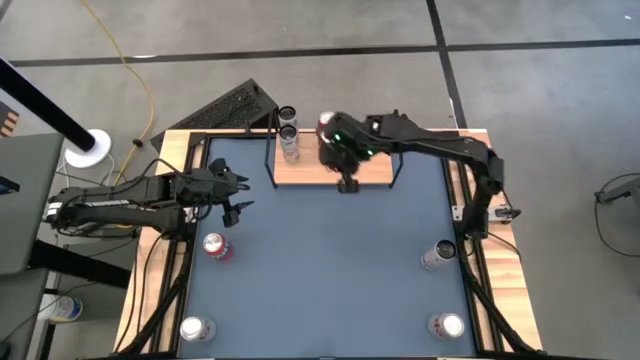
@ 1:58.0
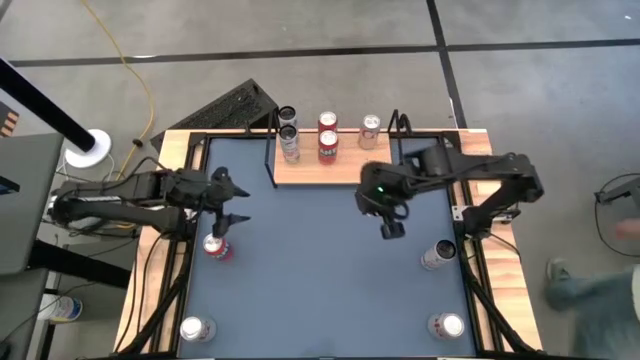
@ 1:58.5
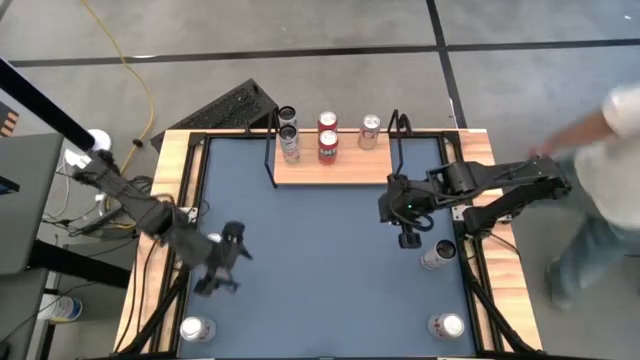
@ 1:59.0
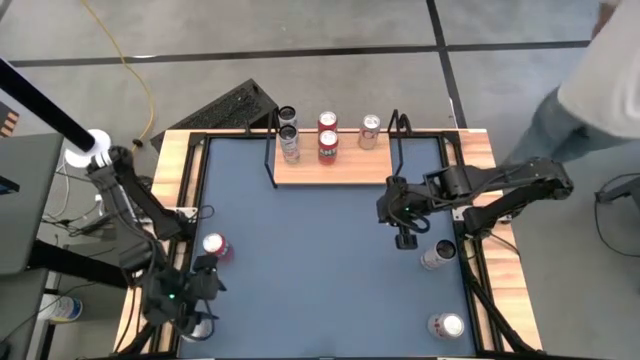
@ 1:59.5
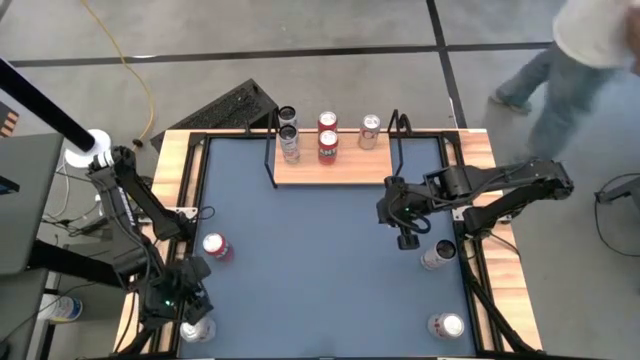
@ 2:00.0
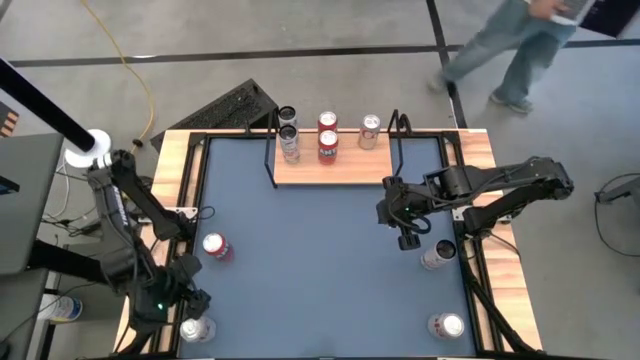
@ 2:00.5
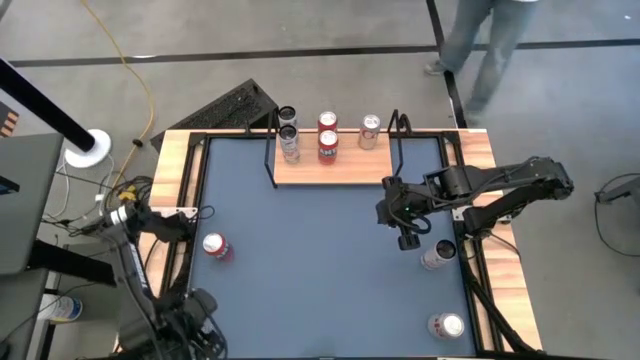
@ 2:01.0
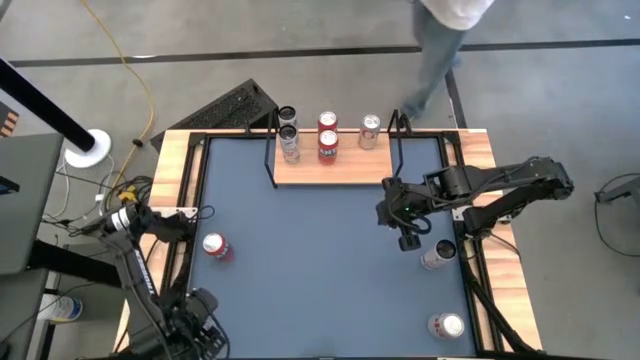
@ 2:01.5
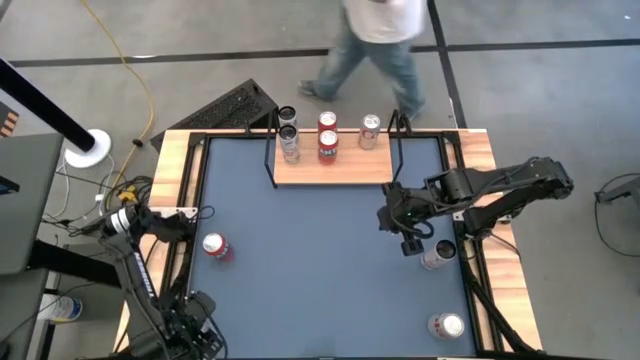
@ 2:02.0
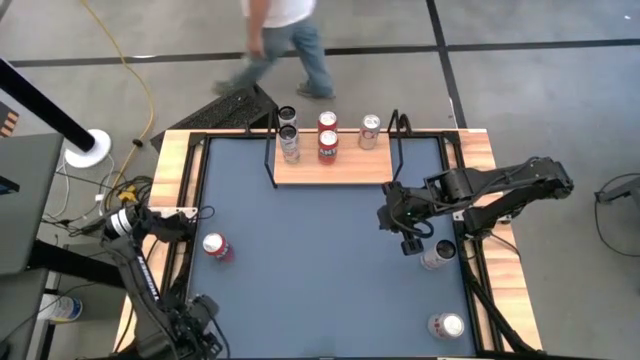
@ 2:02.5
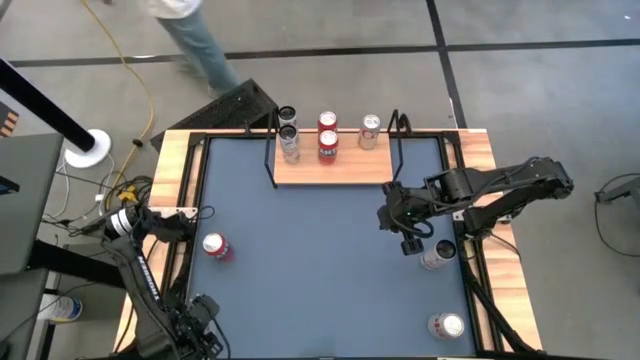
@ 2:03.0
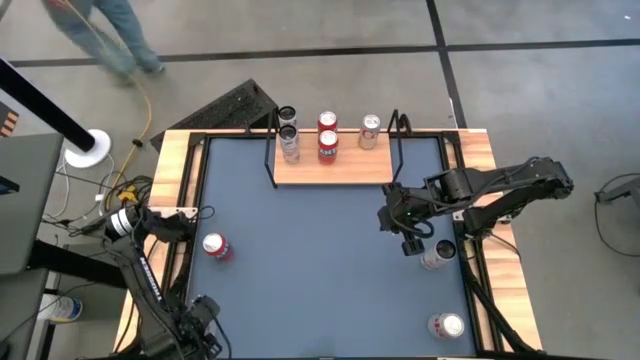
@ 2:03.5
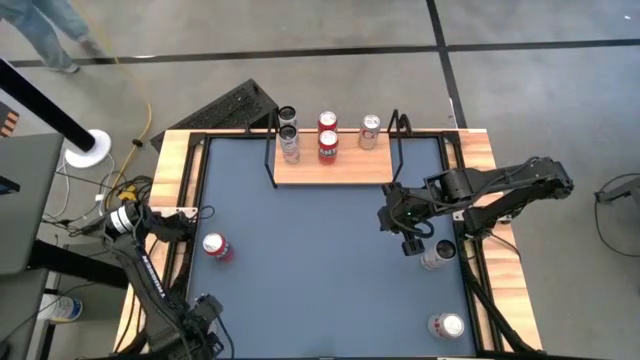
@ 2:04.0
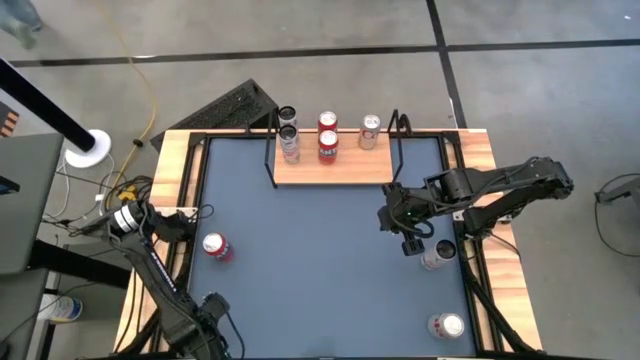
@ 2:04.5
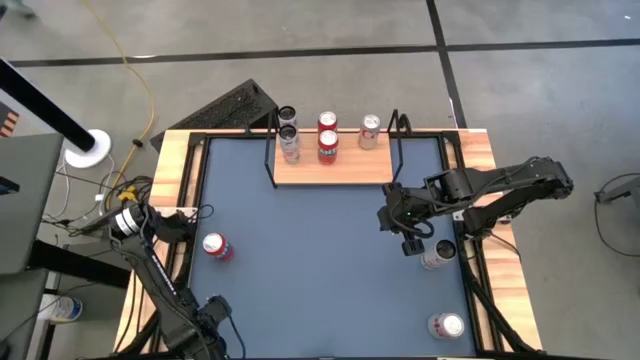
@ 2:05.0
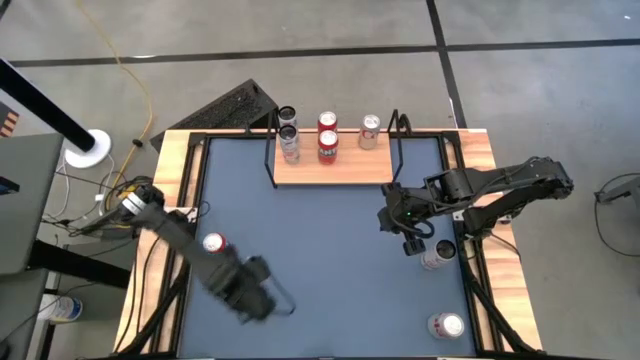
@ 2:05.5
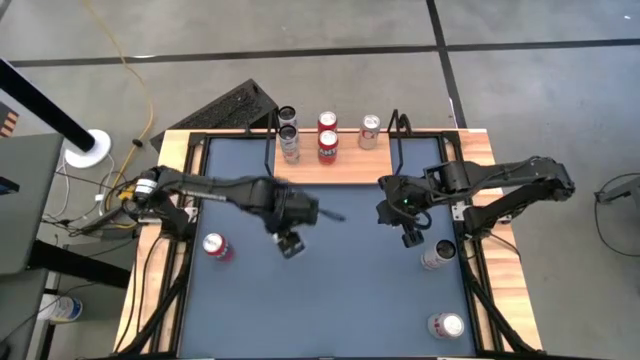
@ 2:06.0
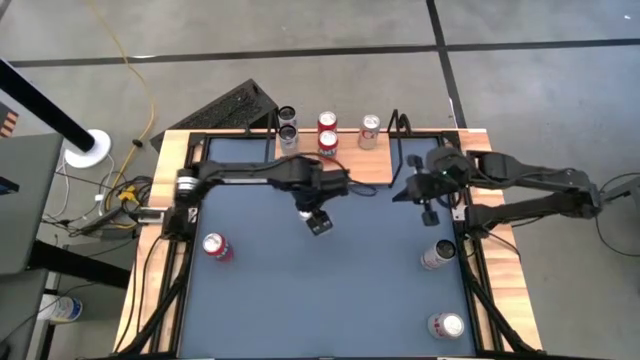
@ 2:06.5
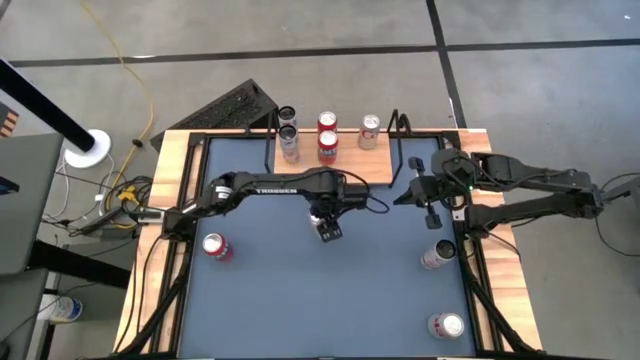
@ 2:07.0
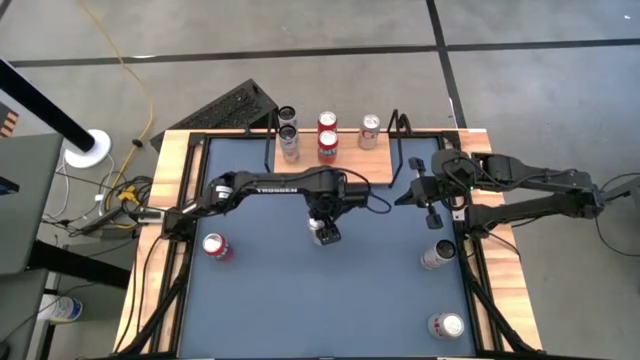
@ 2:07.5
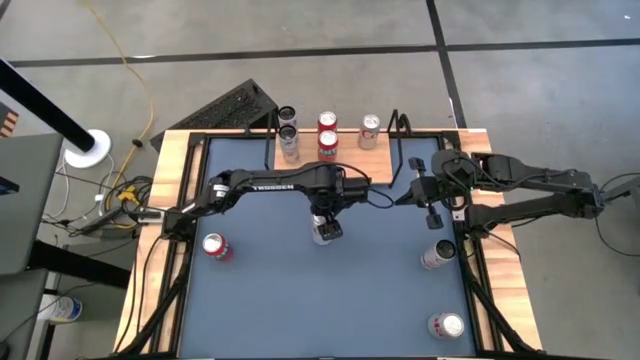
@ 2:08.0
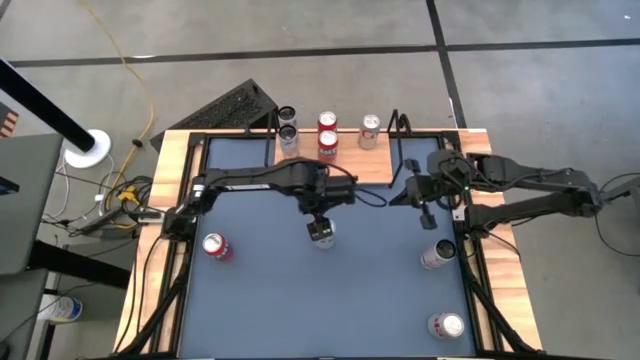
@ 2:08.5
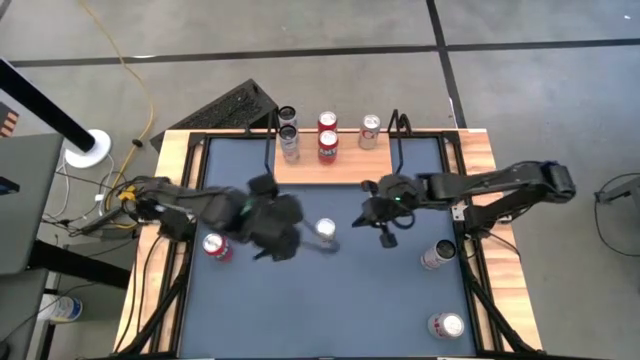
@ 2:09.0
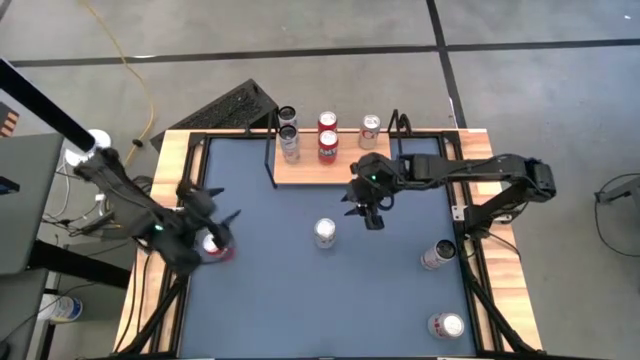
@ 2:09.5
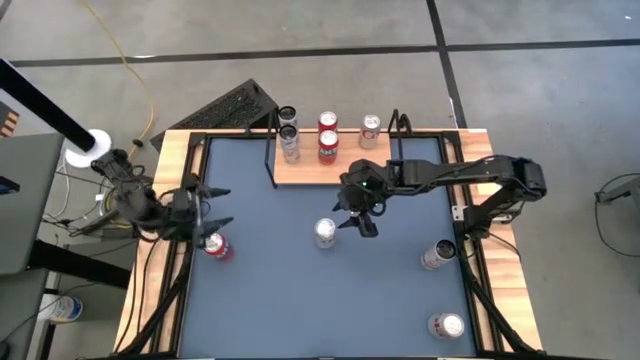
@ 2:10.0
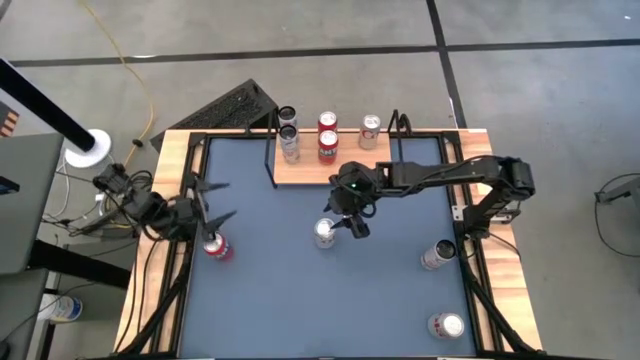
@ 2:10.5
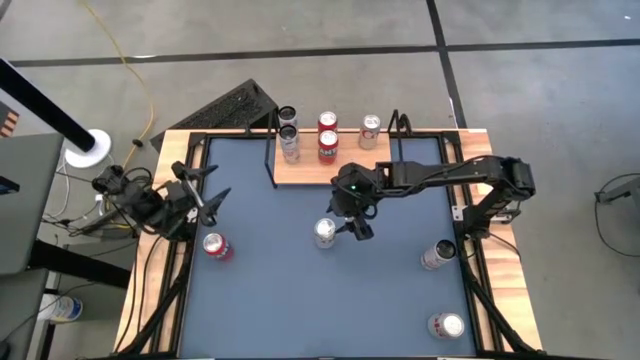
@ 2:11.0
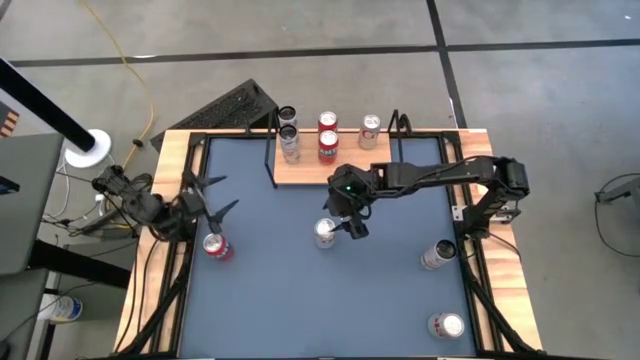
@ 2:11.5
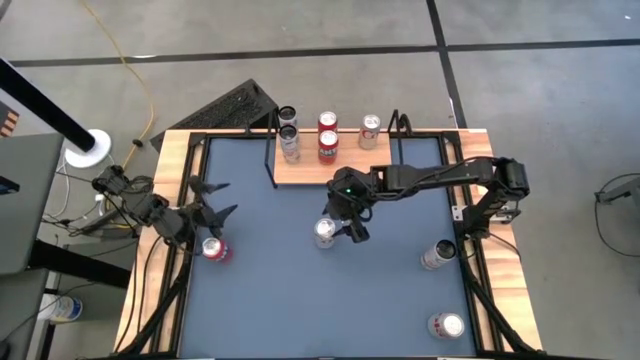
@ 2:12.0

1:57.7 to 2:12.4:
Task: Place canned beverage on shelf
Put the left red-silver soda can on the shelf aligned with the other red-silver soda can

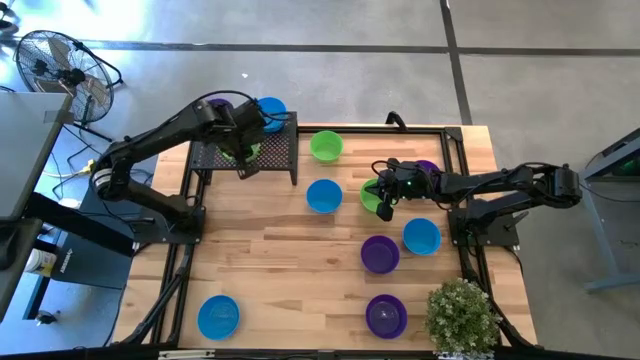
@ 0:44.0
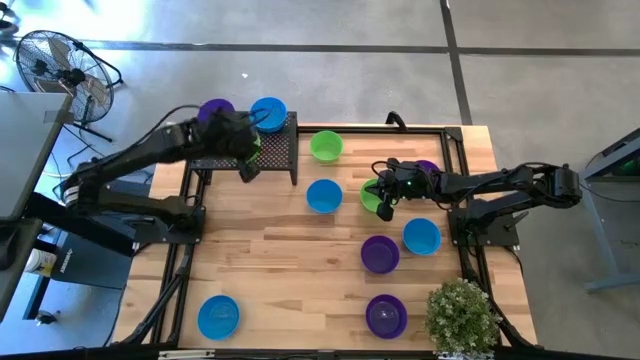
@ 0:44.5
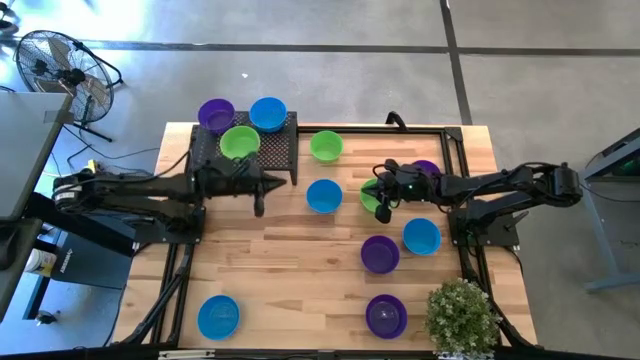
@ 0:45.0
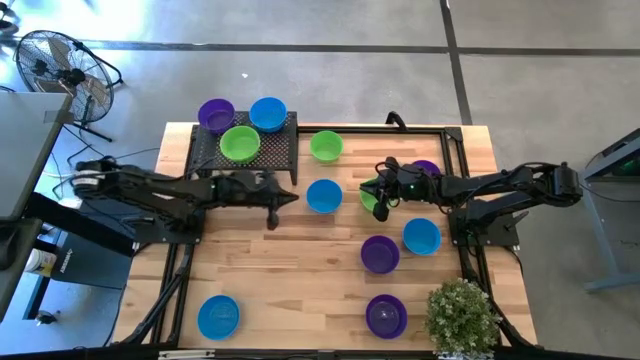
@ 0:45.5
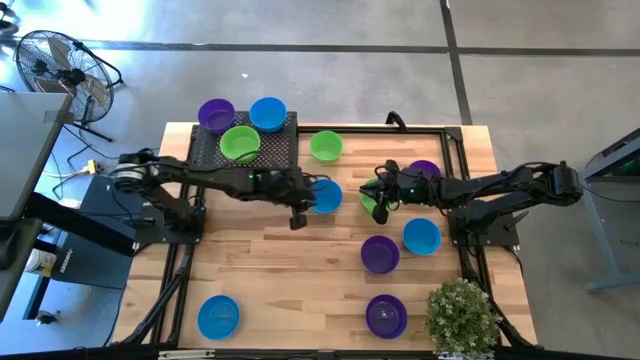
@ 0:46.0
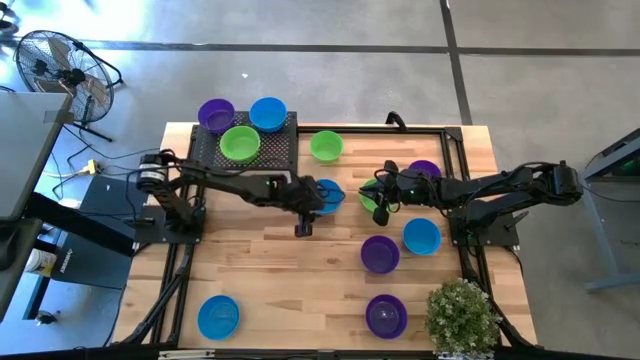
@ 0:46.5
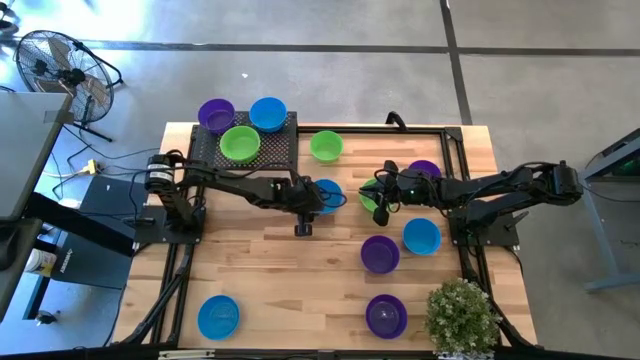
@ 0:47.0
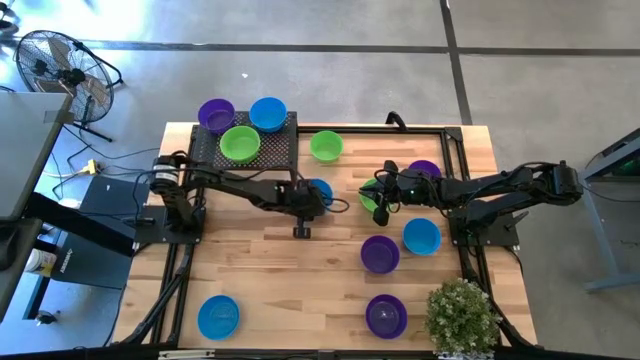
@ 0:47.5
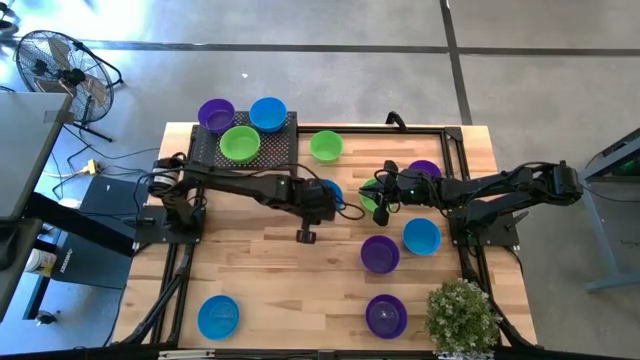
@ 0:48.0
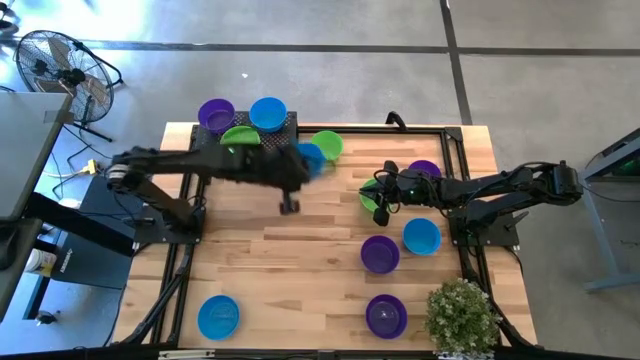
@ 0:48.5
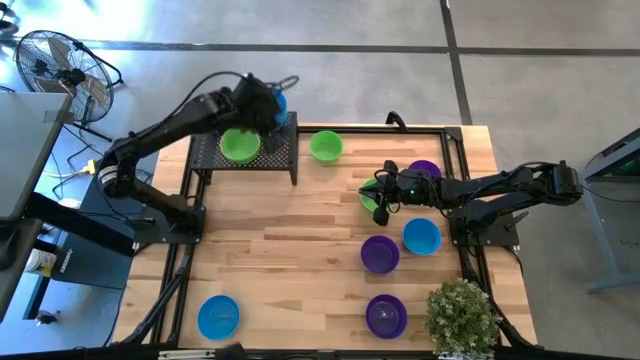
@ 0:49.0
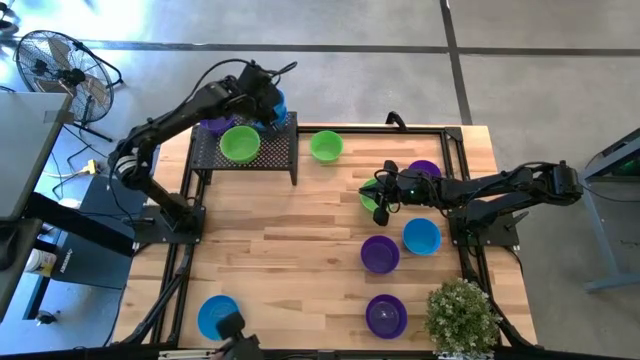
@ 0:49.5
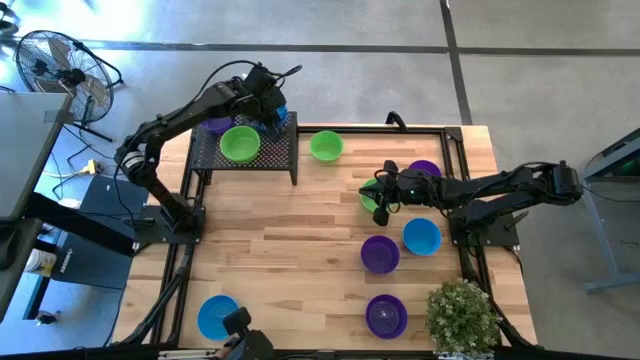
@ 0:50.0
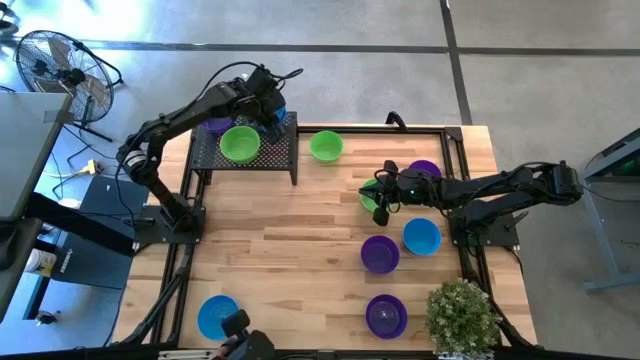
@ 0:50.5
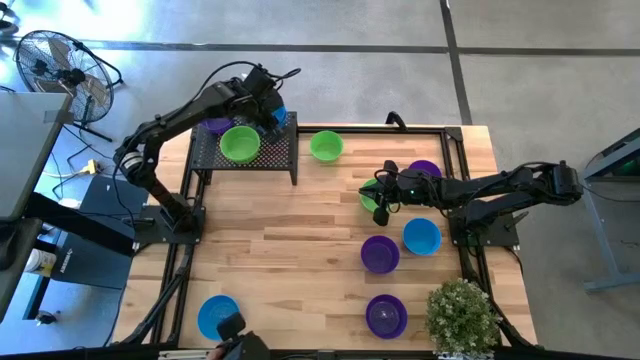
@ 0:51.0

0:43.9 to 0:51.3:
Task: Pick & Place Mini bowls
Stack the blue bowl on top of the blue bowl on the shelf
